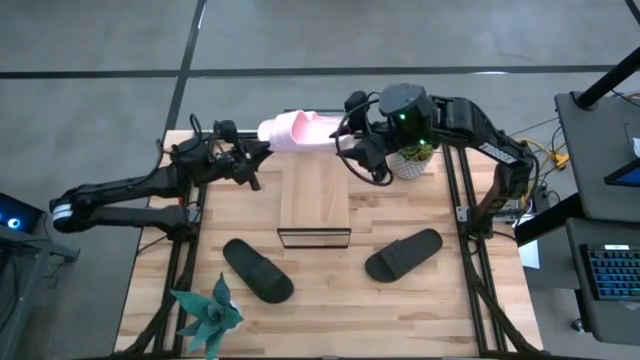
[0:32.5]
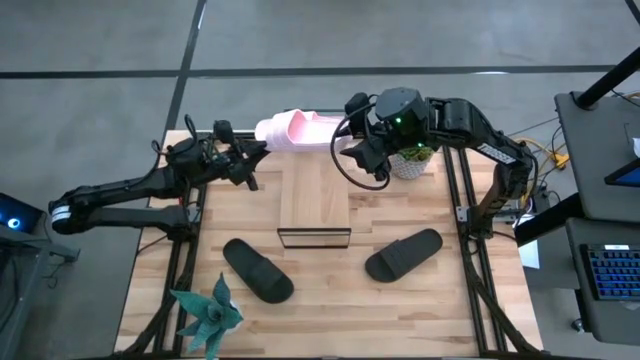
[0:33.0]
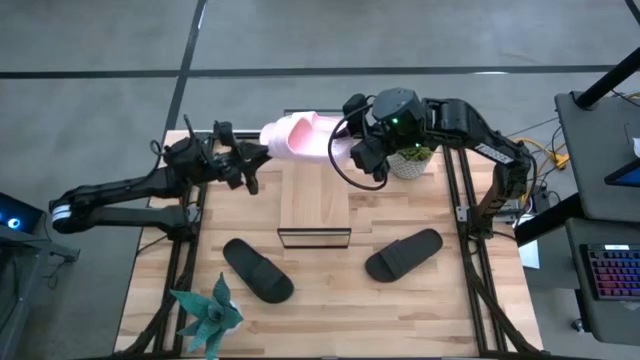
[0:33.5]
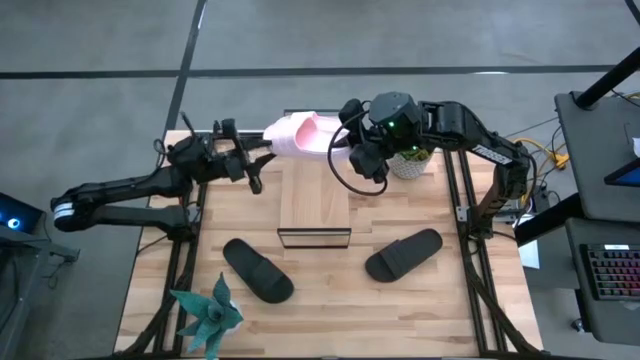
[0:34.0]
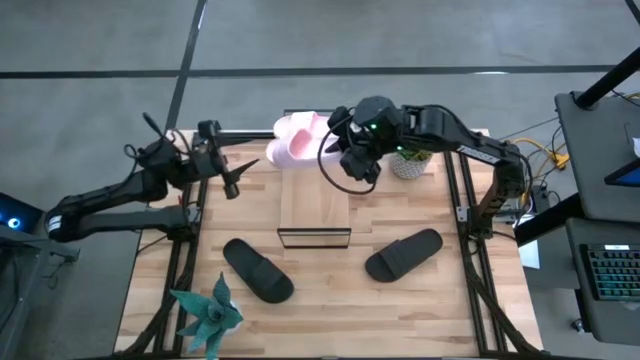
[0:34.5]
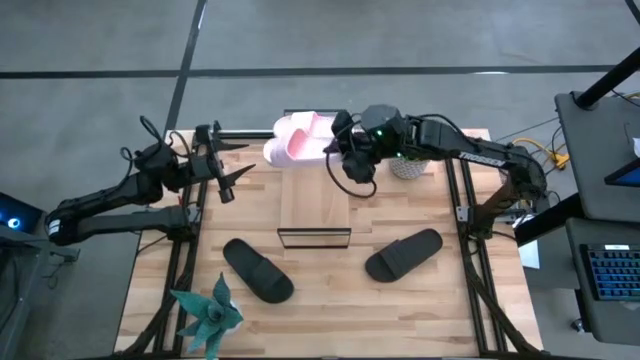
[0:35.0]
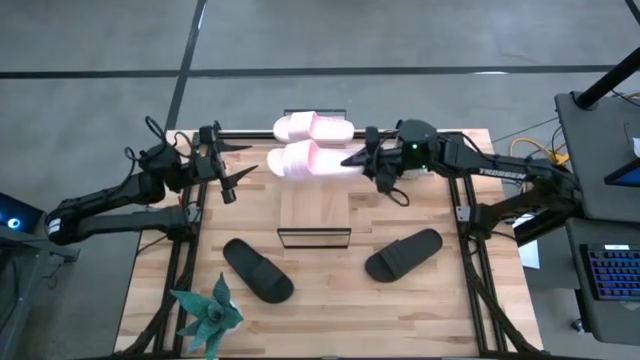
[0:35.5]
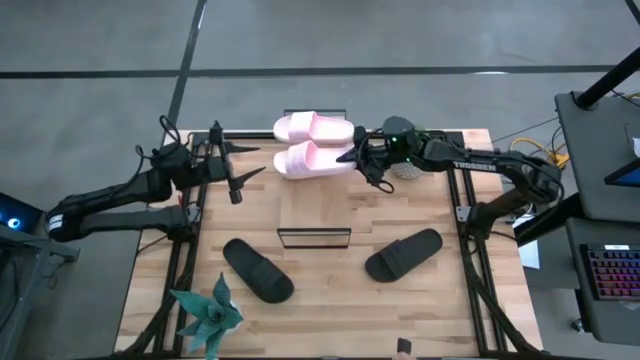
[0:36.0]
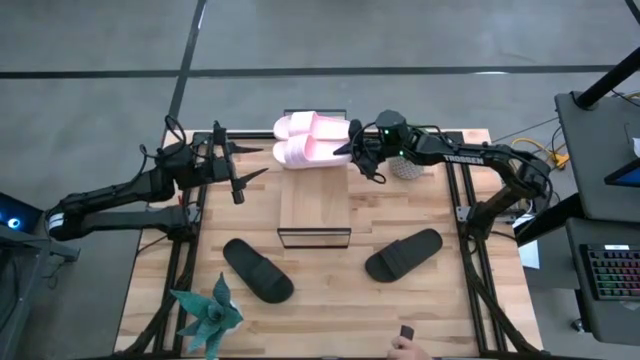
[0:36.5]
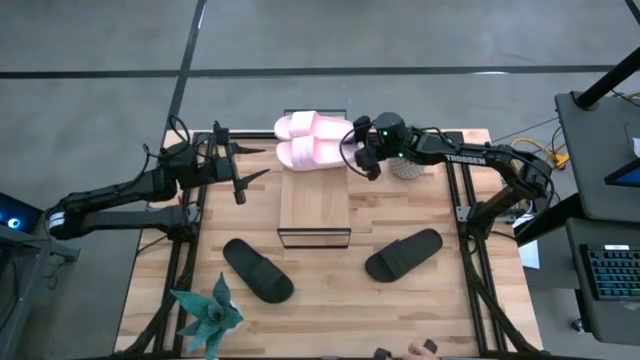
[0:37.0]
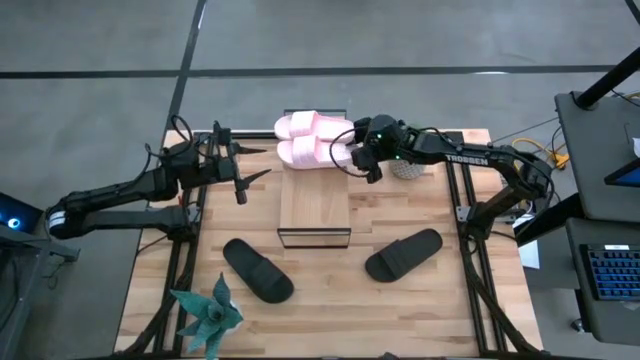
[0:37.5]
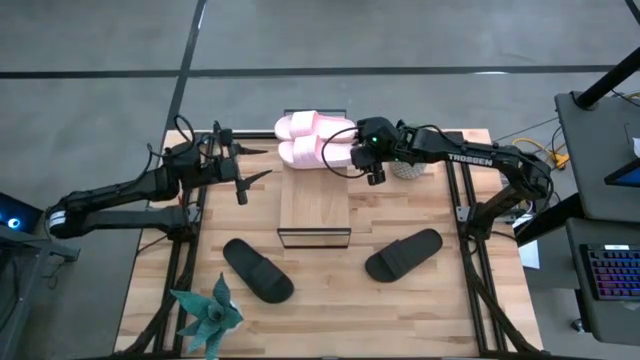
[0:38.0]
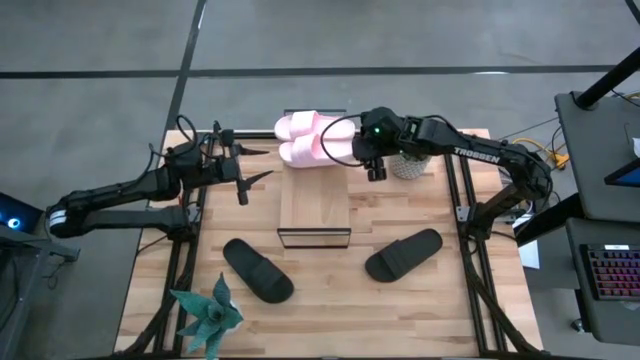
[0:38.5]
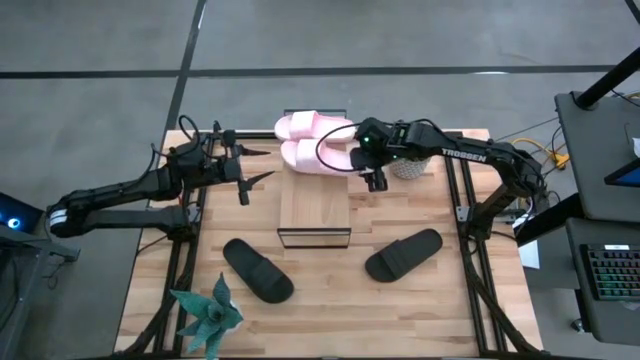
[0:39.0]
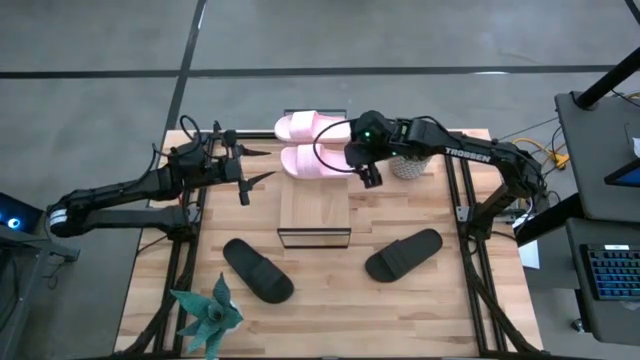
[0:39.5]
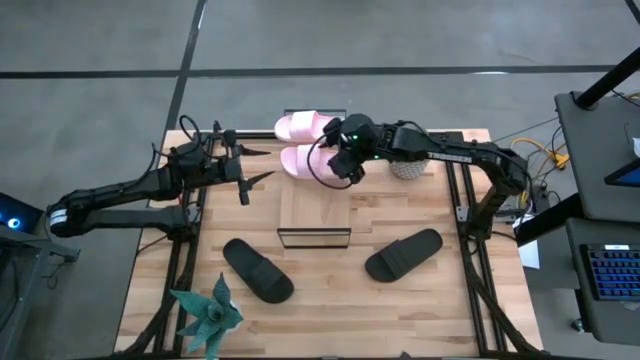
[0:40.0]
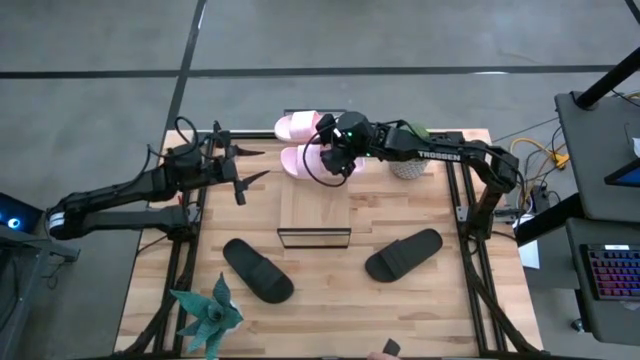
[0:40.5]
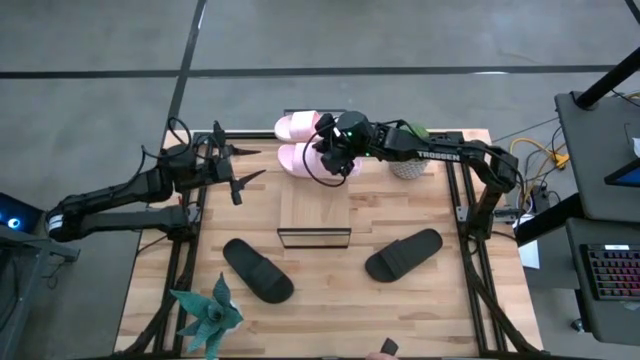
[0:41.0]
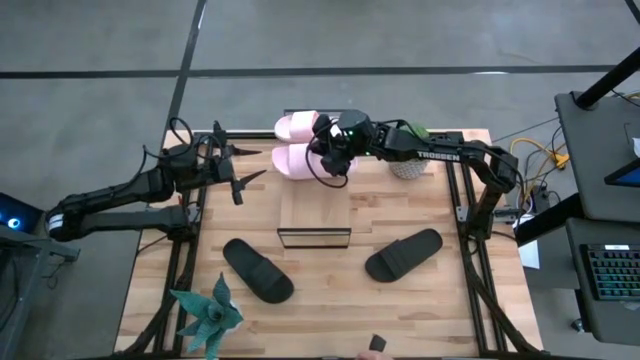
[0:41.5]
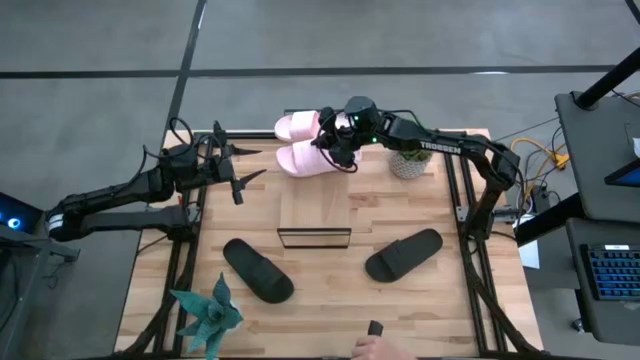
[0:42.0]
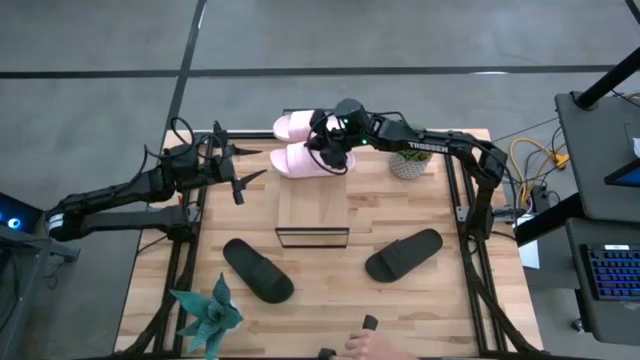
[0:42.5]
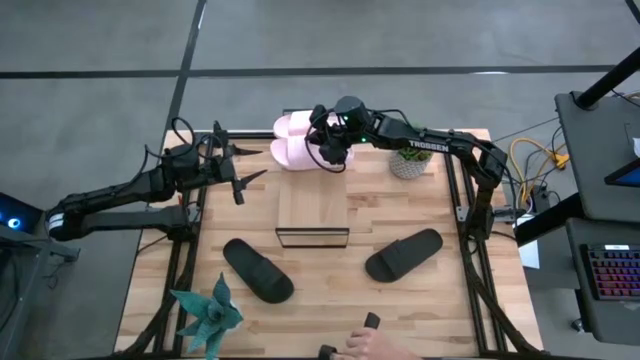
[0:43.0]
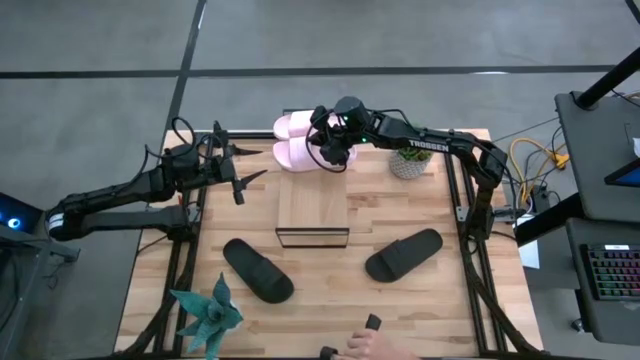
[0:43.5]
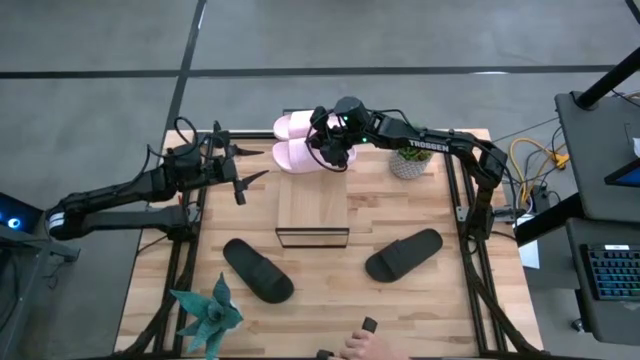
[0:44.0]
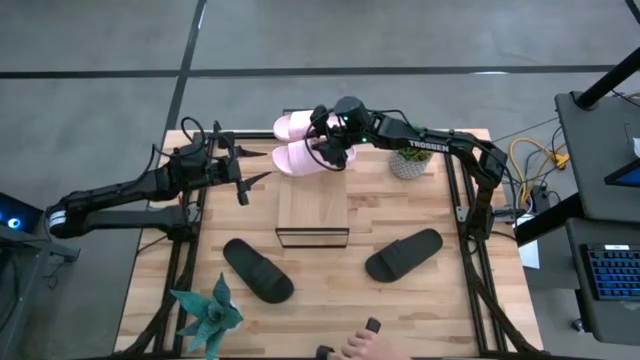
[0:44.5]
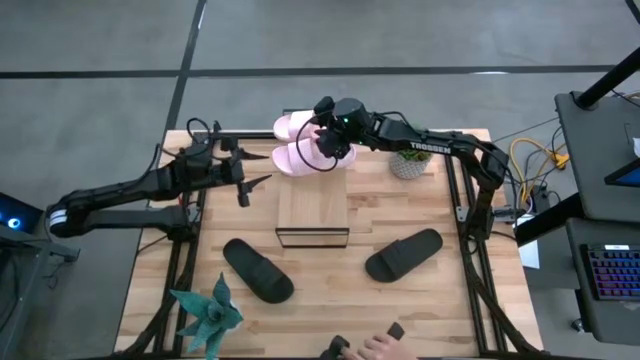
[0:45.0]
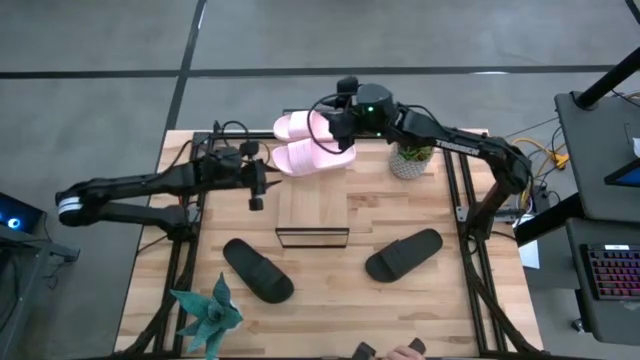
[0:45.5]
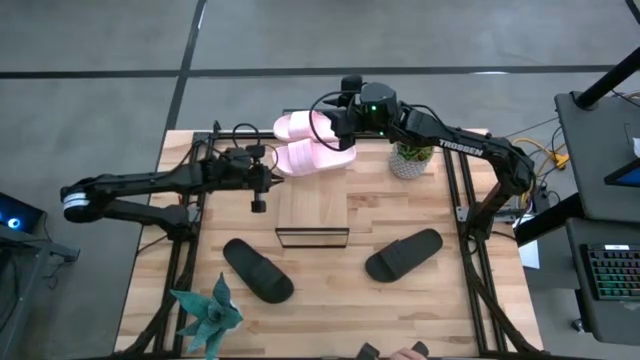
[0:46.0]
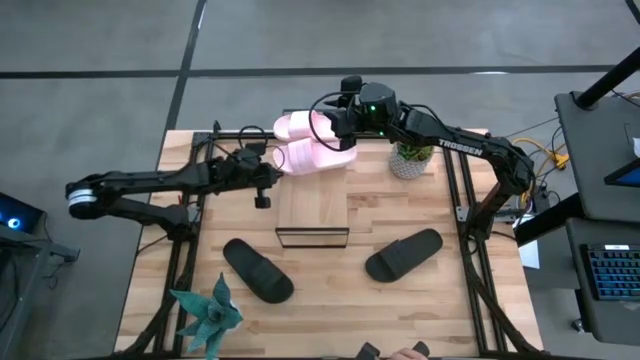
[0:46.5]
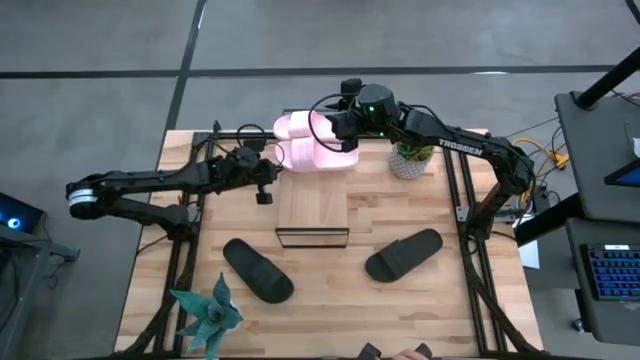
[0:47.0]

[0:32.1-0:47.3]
Task: Pick and place slides into the shelf
Put the pink slide on the shelf

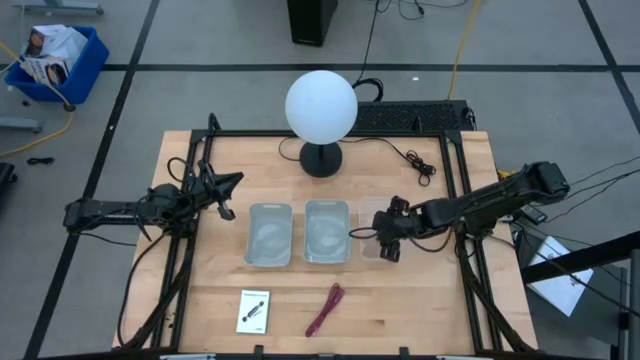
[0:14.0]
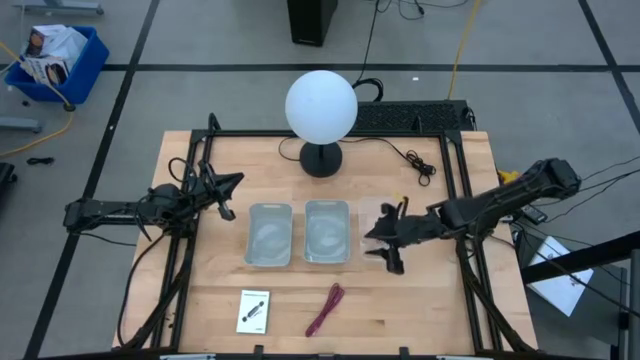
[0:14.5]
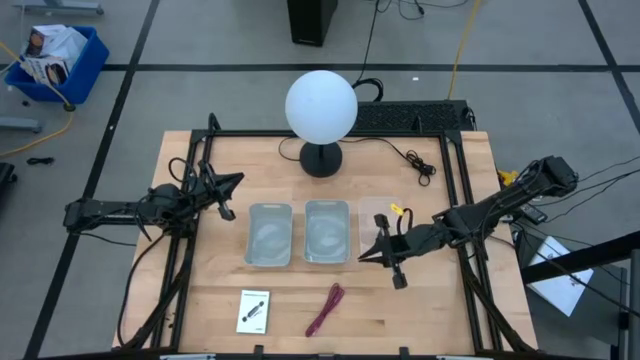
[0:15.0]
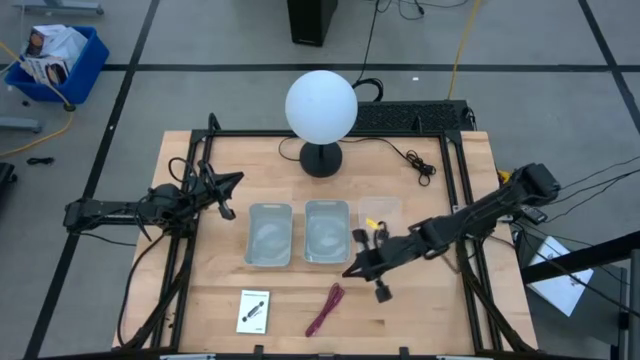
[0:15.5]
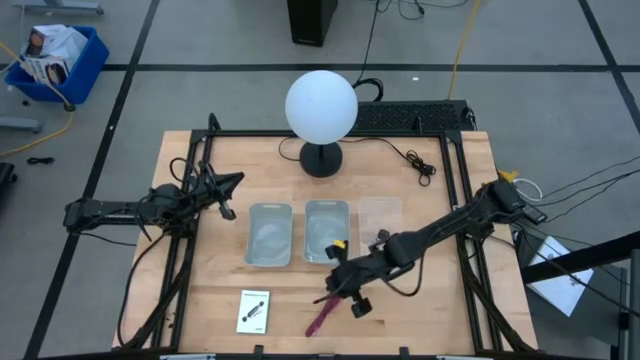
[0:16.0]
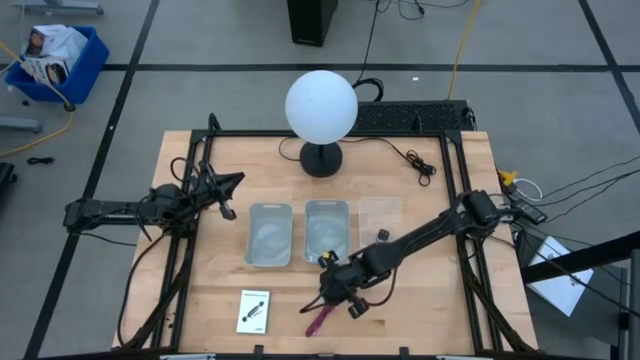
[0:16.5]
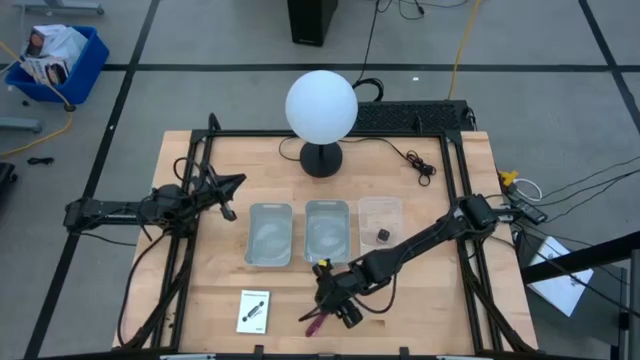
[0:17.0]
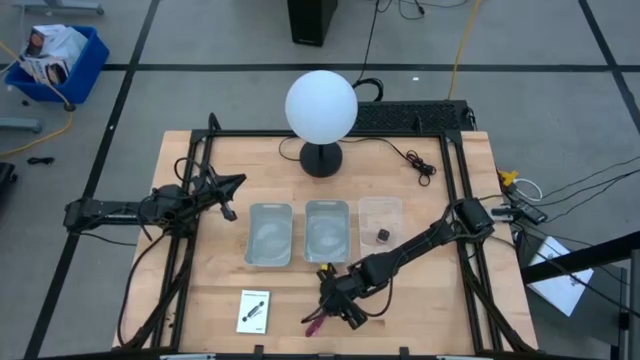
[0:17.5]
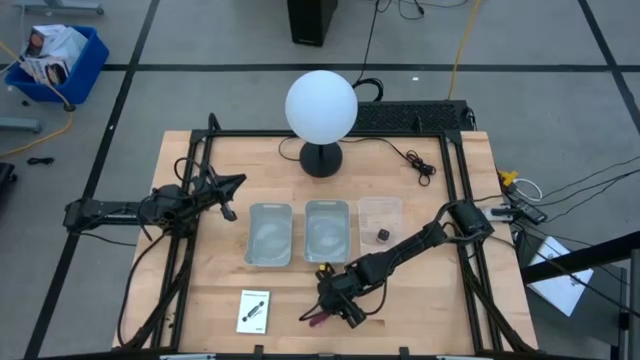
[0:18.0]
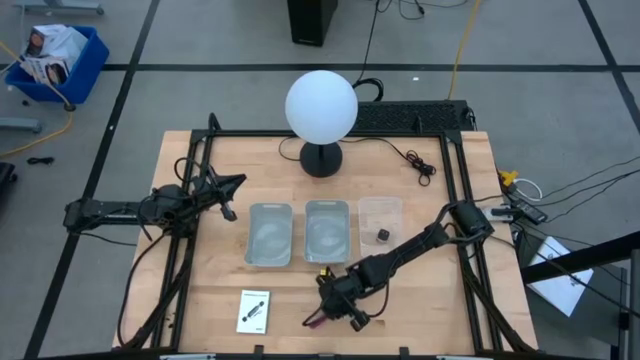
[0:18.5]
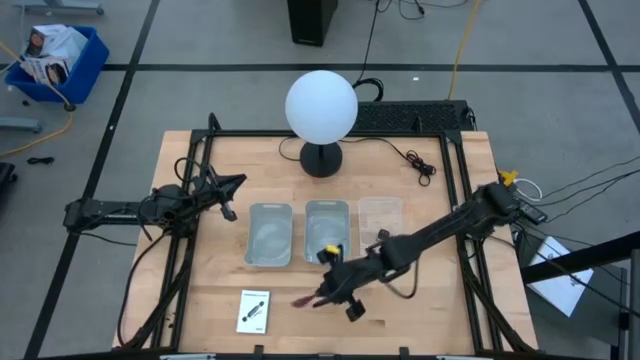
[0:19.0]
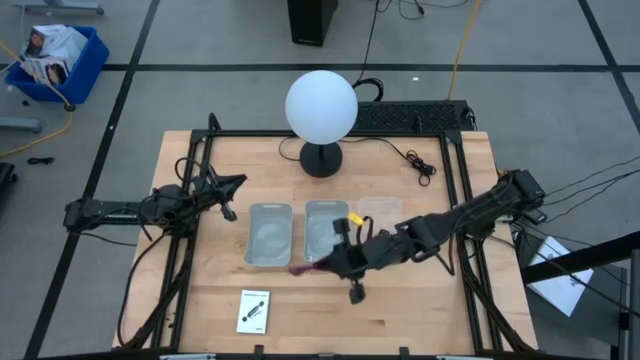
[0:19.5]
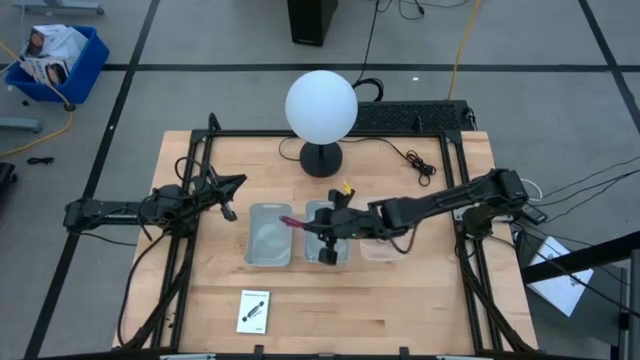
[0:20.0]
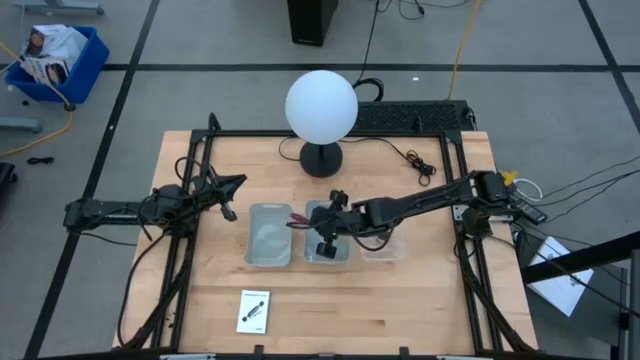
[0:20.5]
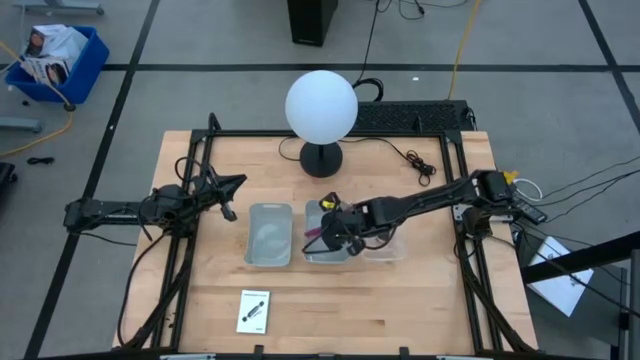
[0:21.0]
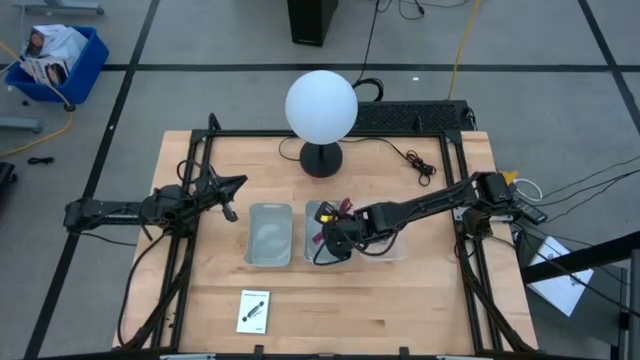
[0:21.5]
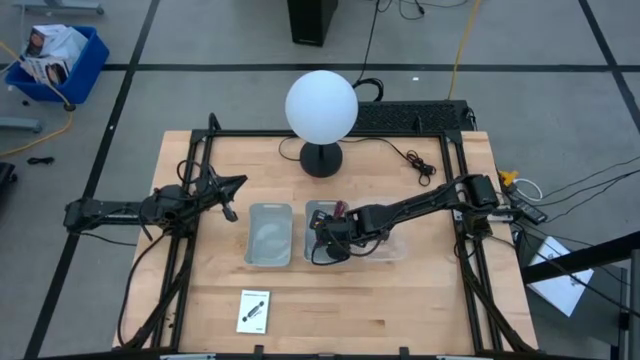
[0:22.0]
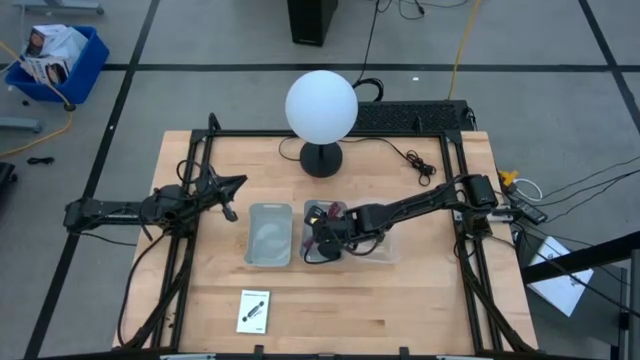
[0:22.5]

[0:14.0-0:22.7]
Task: Pick and place items into bin
Put the pink charger cable into the right gray bin
